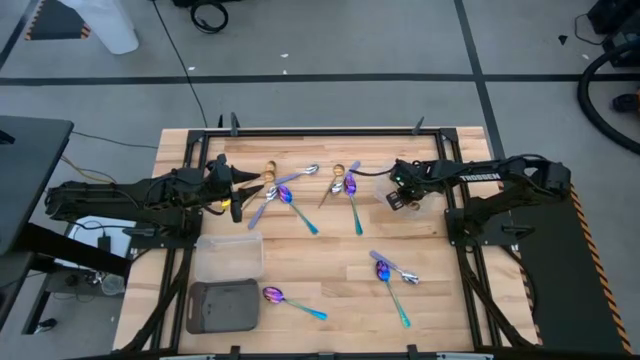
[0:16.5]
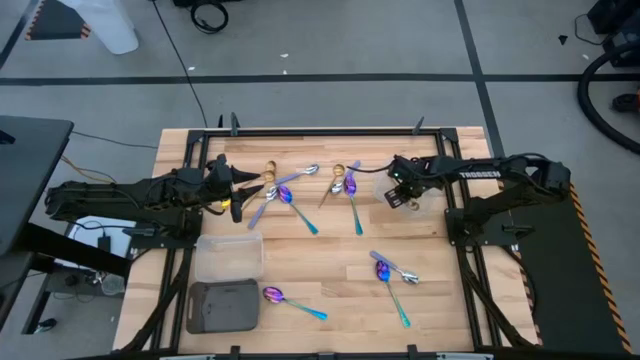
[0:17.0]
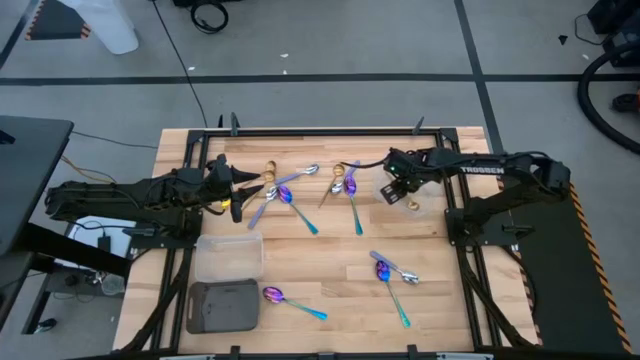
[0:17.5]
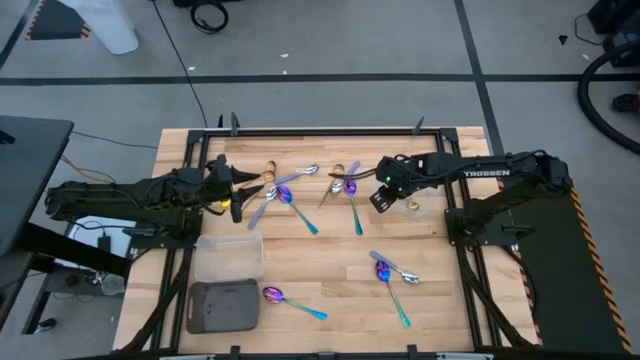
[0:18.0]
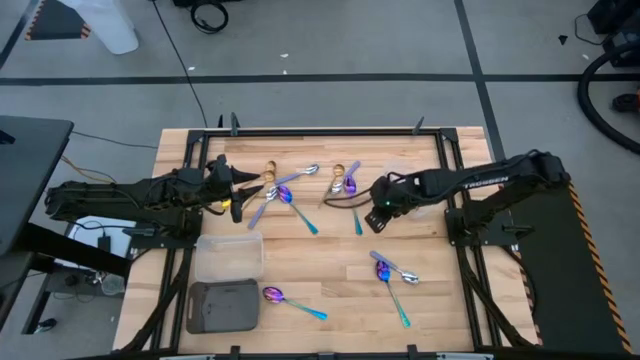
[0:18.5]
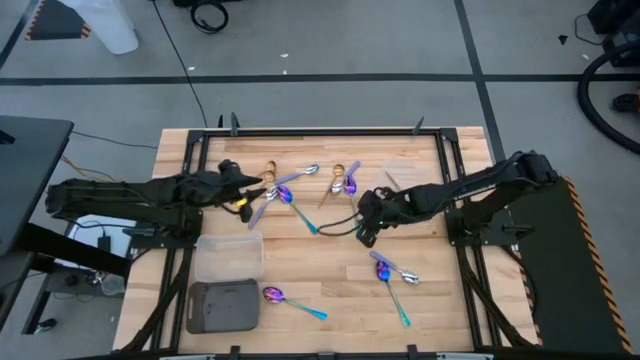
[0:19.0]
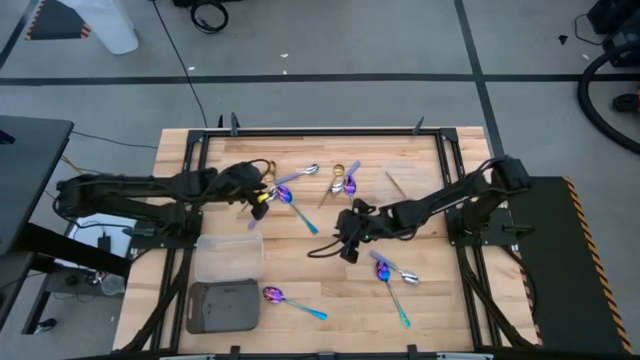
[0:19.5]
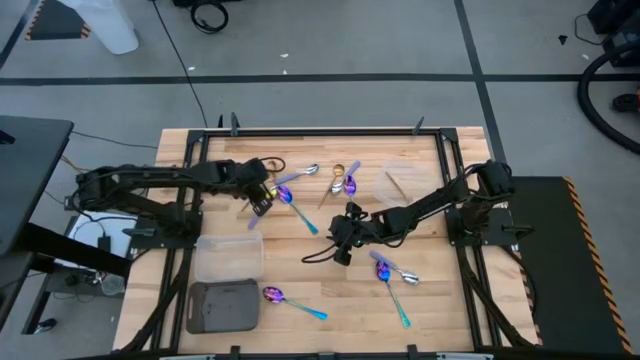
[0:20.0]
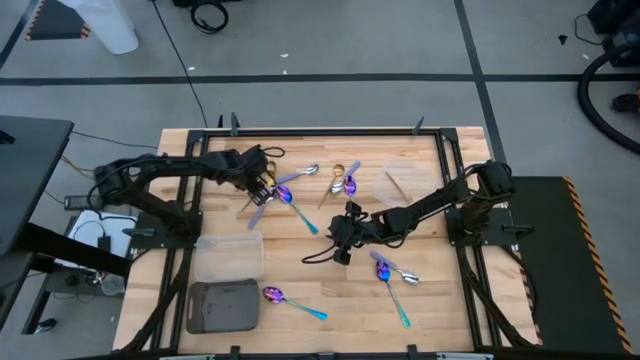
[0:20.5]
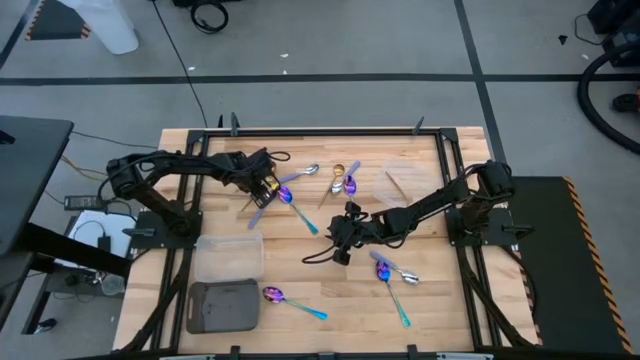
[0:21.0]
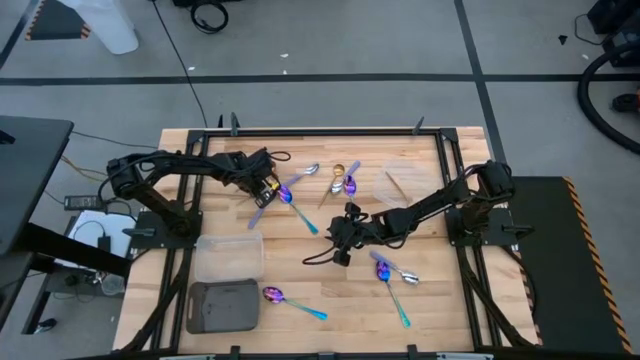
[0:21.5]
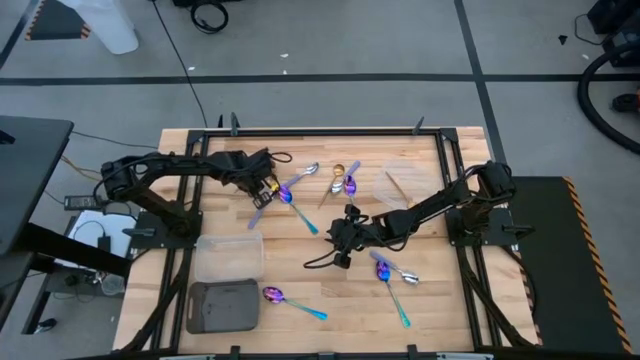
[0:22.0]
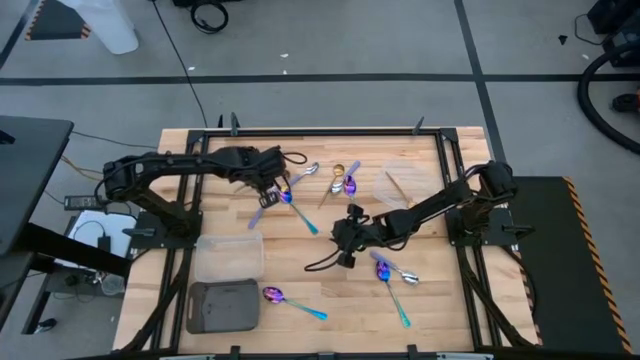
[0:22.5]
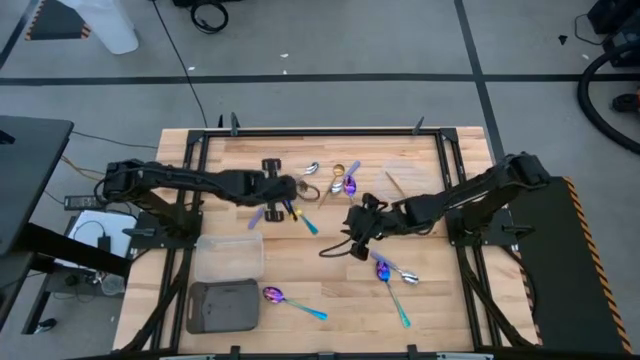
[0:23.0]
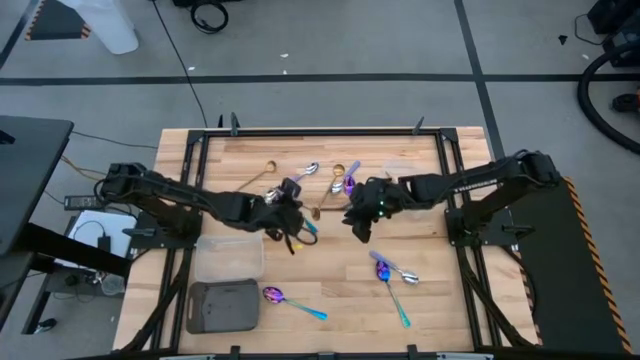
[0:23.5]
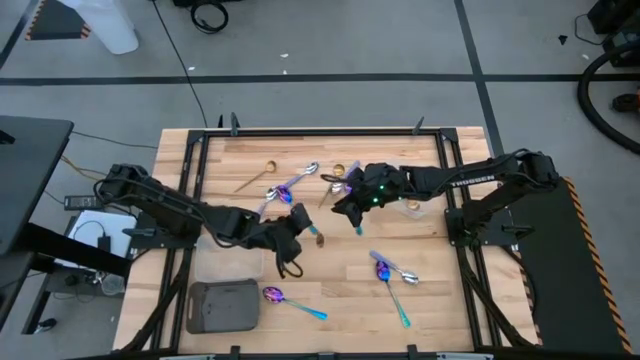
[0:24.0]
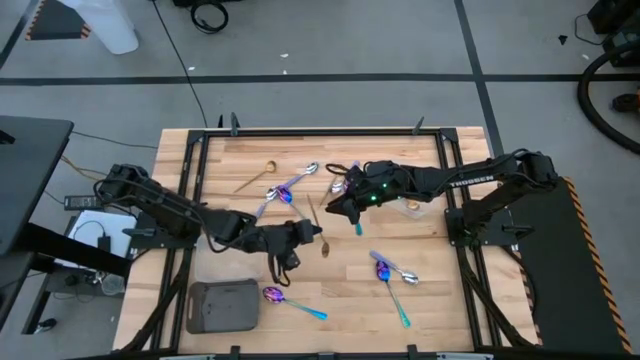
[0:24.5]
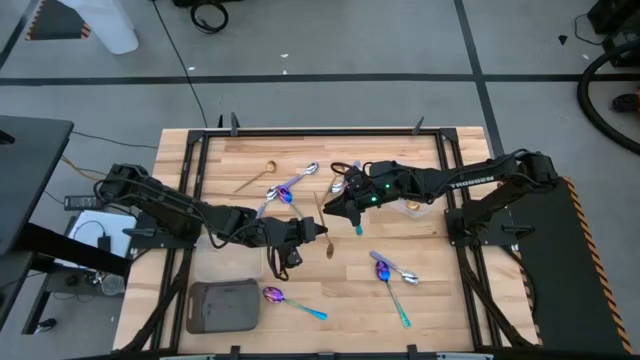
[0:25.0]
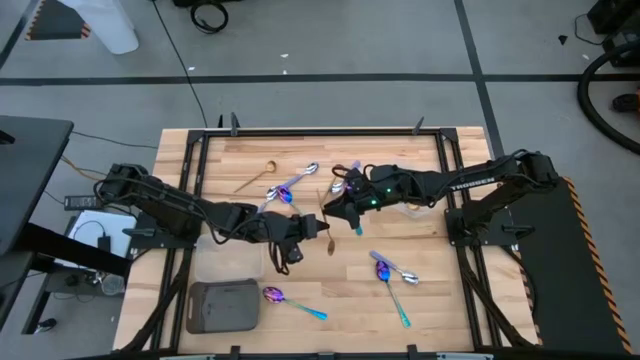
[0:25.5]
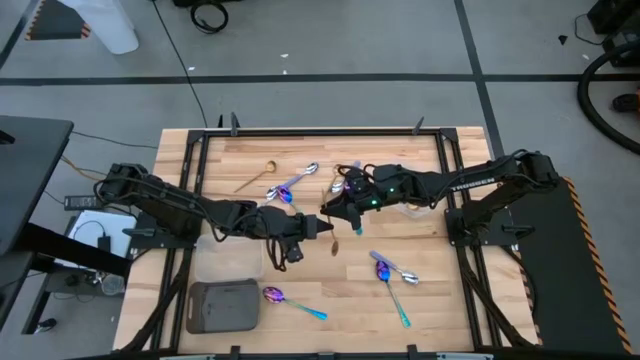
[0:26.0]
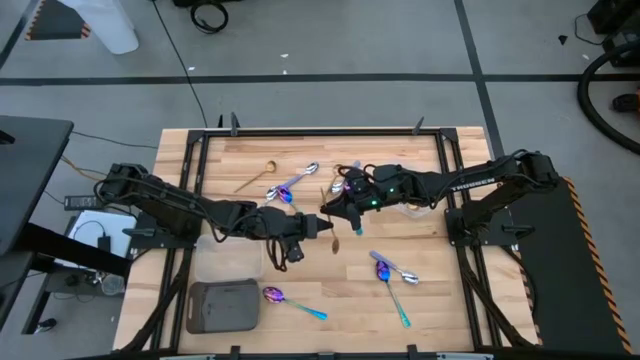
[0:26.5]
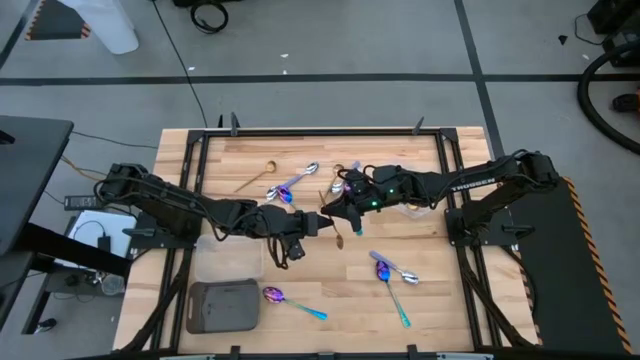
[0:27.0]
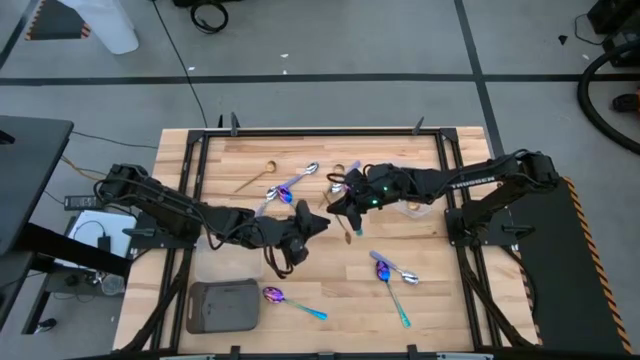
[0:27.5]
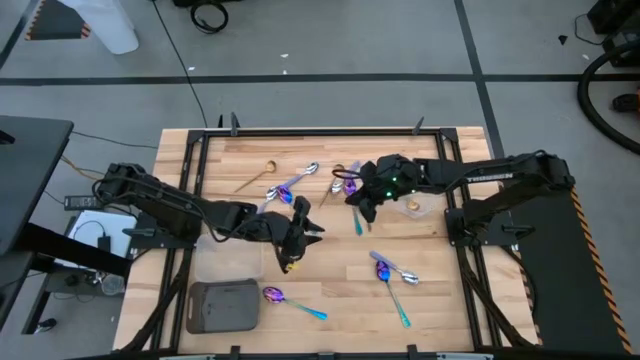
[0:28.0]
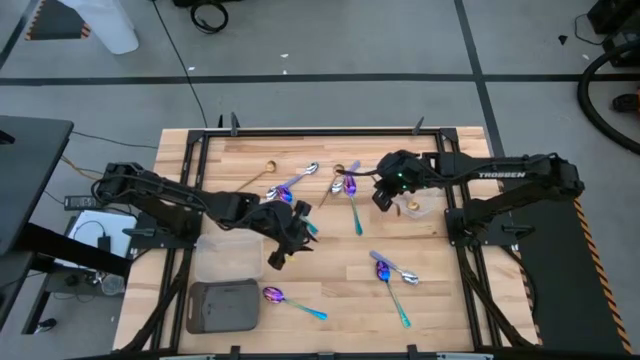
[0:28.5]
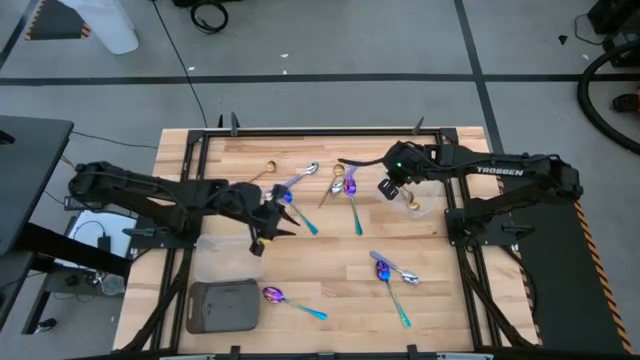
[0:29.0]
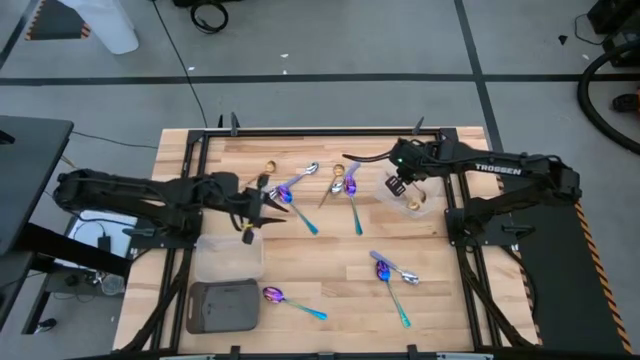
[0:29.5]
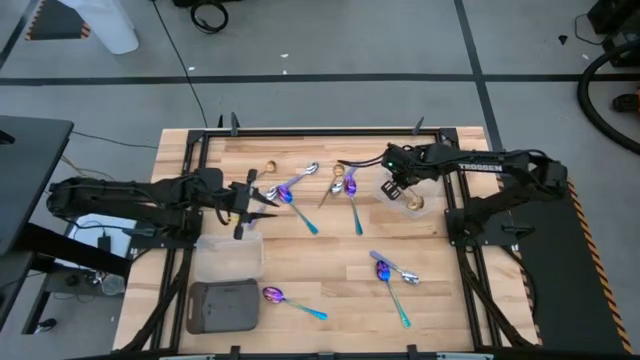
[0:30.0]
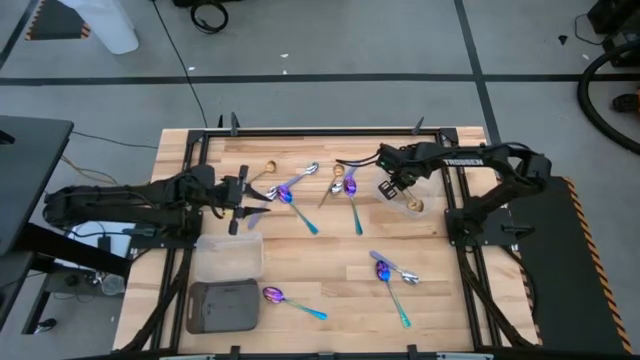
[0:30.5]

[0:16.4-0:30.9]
Task: Sort silverware by color (type)
Put the gold spoon into the top transparent bin

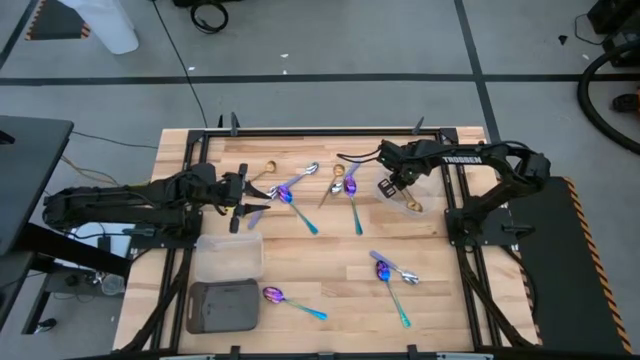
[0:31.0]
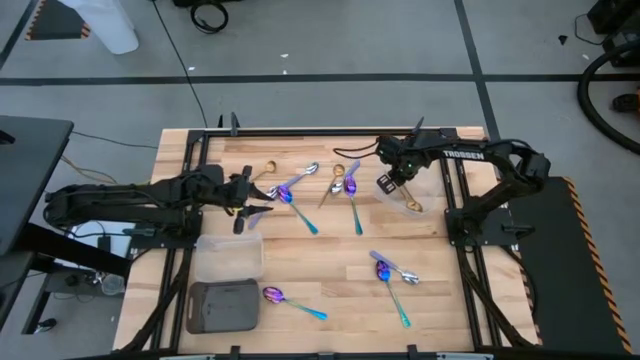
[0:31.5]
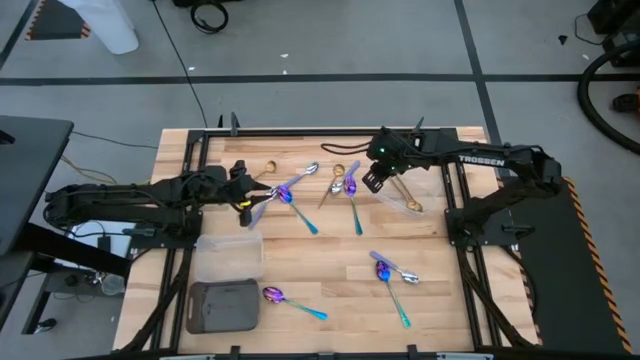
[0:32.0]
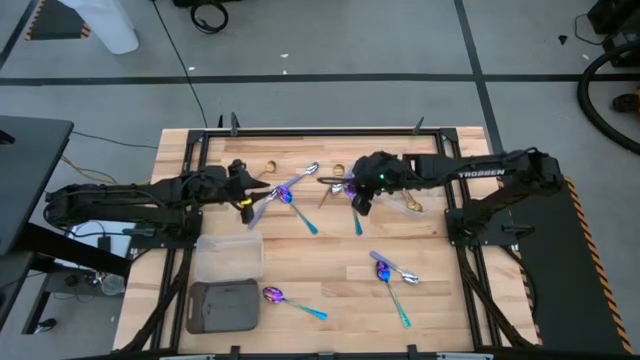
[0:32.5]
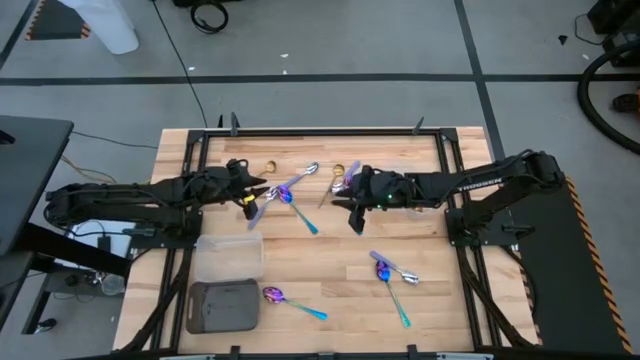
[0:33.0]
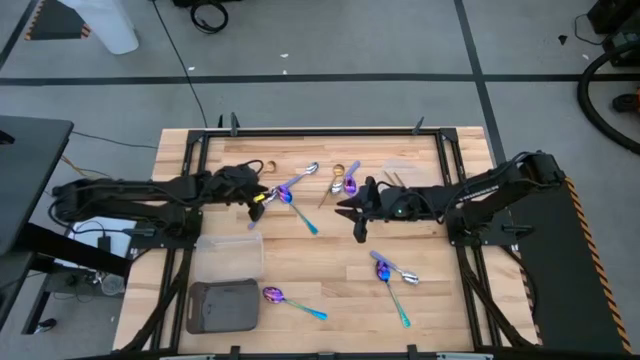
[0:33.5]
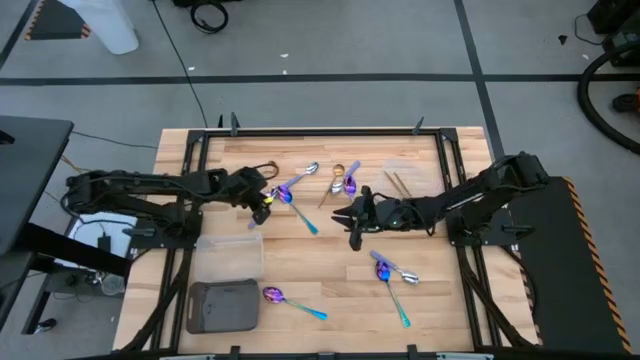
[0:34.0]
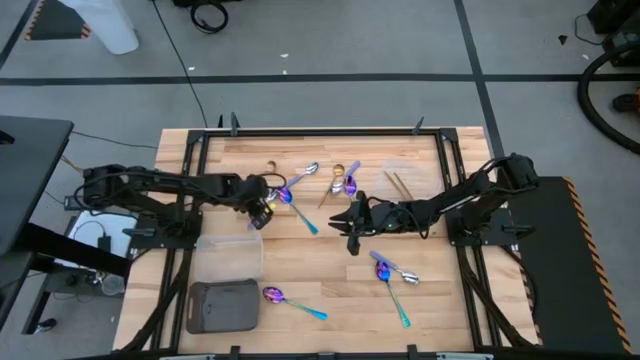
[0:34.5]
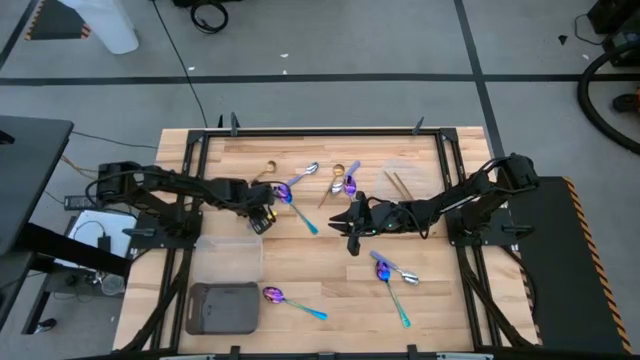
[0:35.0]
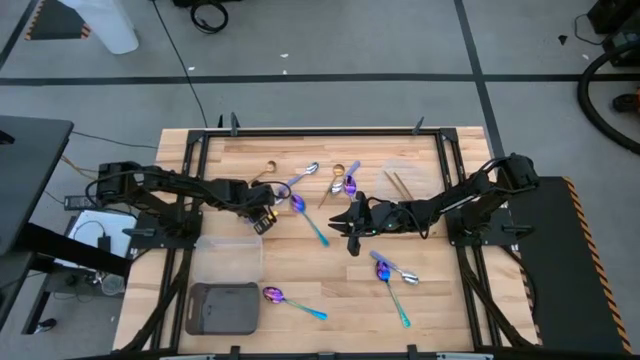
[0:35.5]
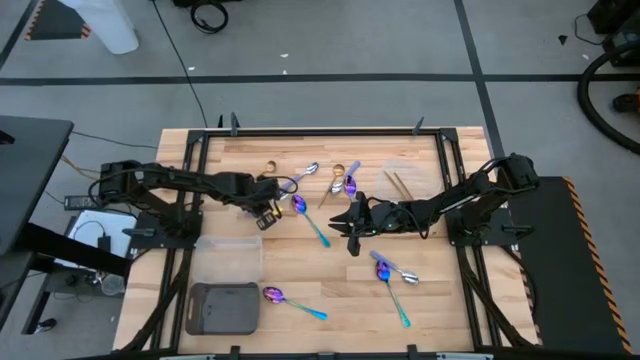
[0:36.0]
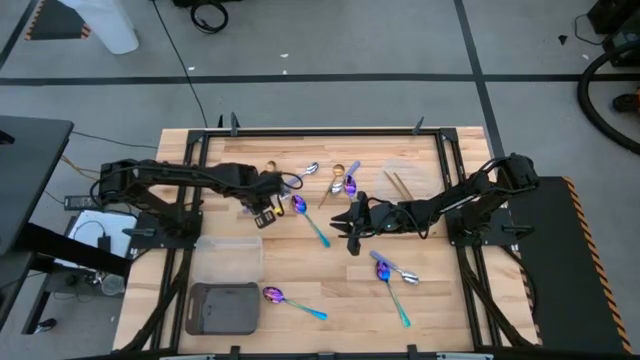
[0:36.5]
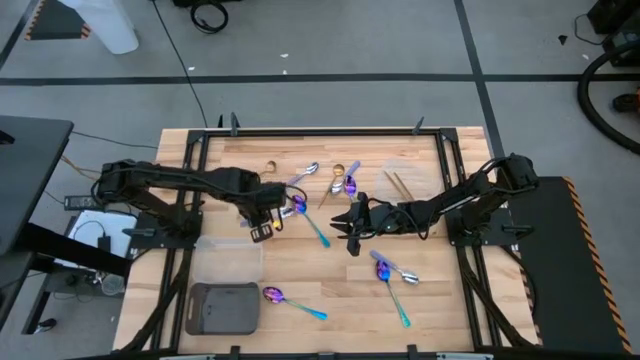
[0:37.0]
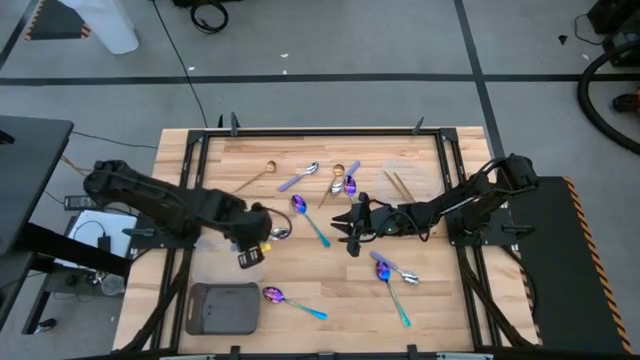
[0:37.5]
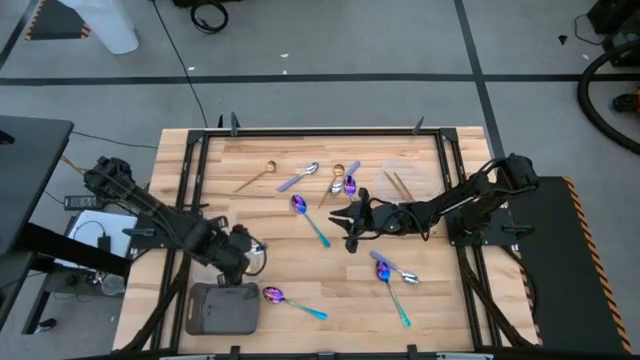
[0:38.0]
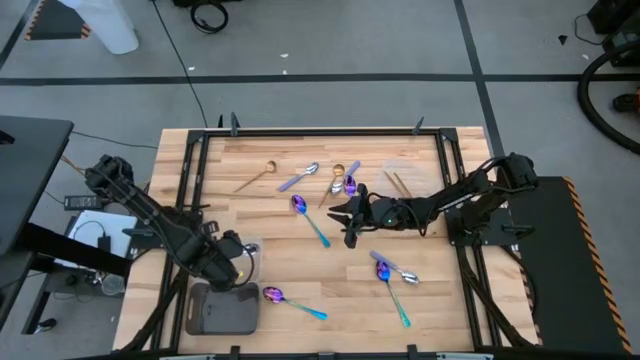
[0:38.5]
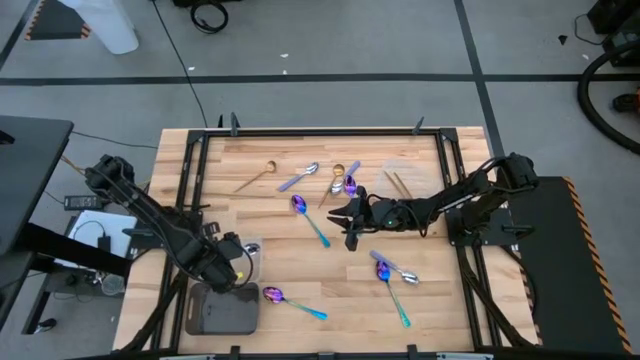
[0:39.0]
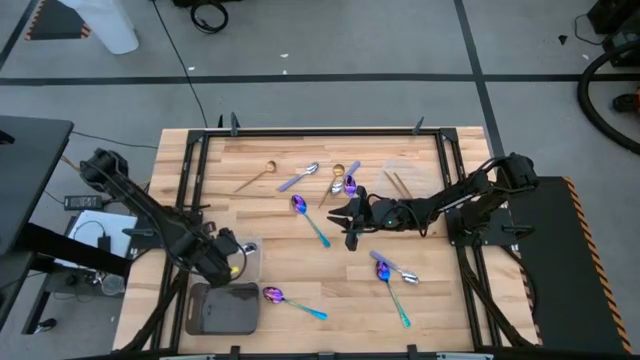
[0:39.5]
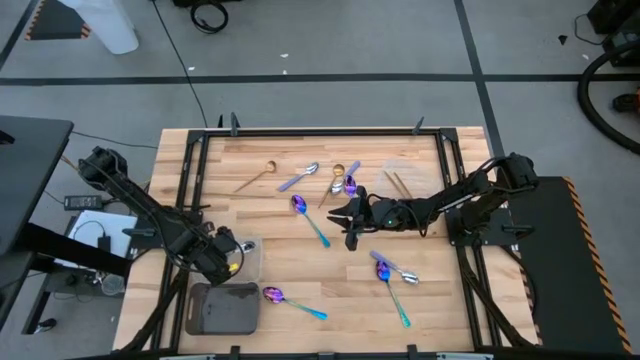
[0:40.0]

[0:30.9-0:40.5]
Put the purple spoon into the bottom transparent bin
